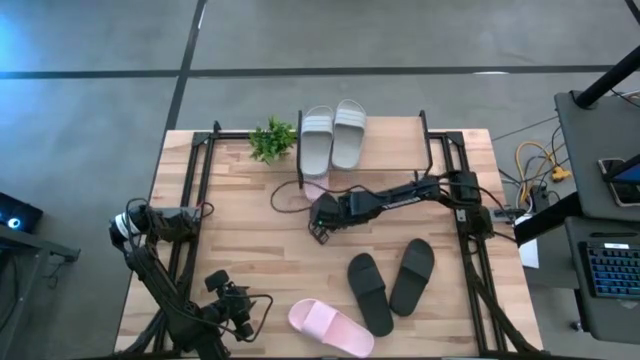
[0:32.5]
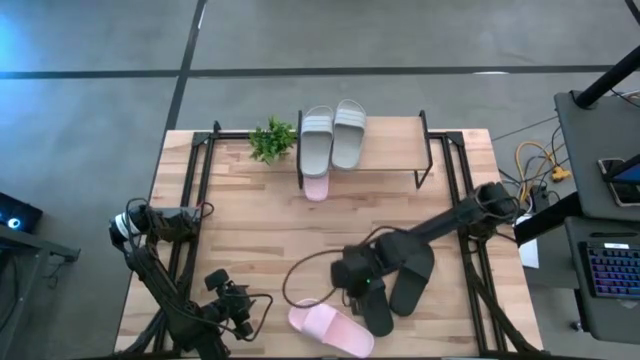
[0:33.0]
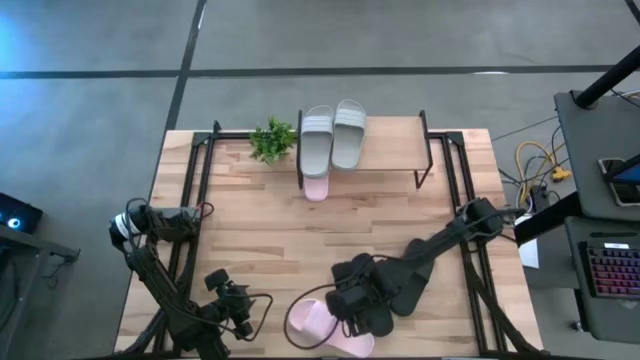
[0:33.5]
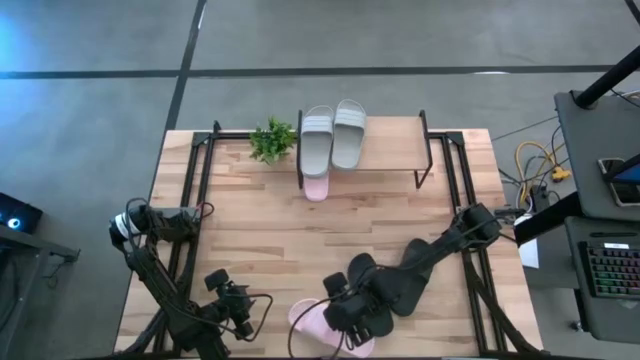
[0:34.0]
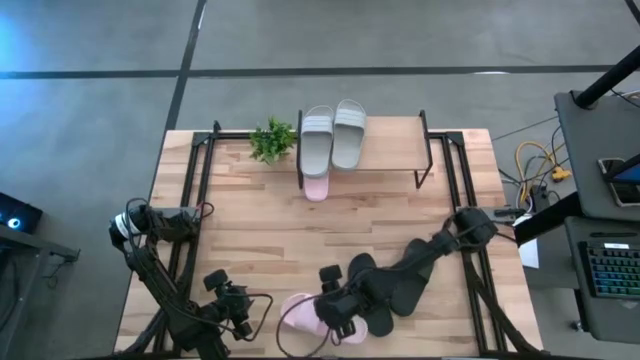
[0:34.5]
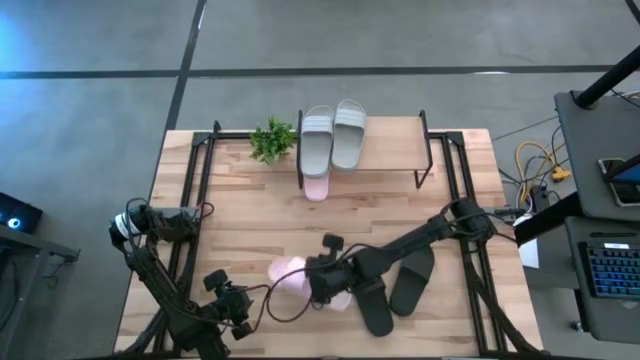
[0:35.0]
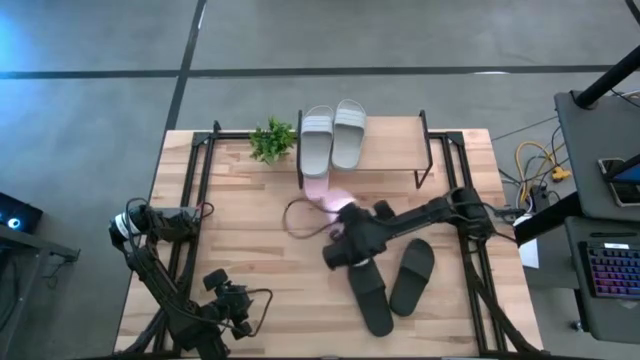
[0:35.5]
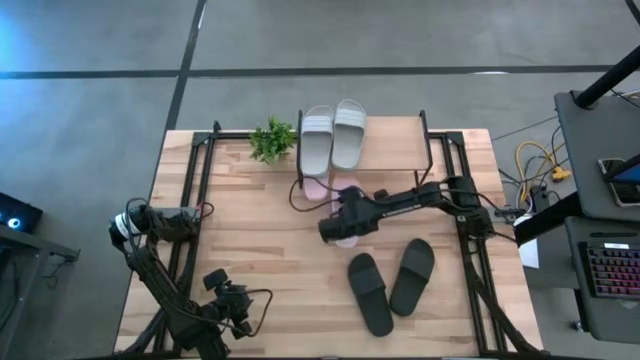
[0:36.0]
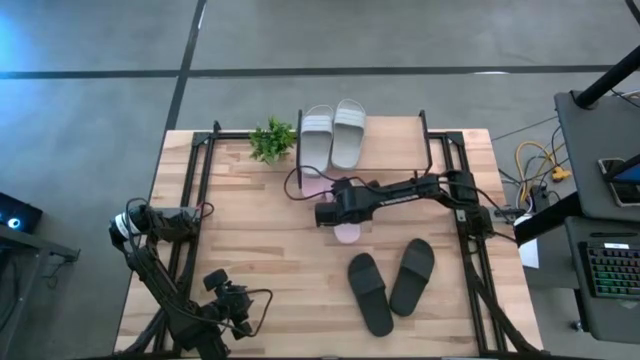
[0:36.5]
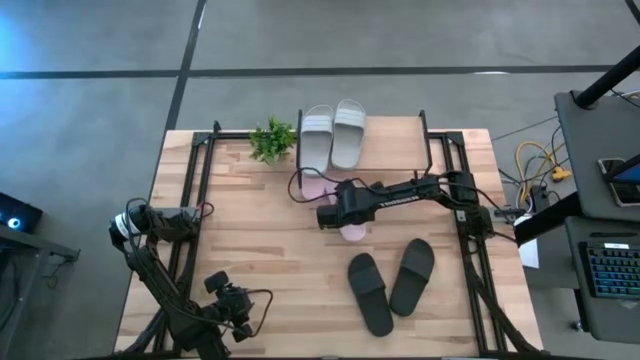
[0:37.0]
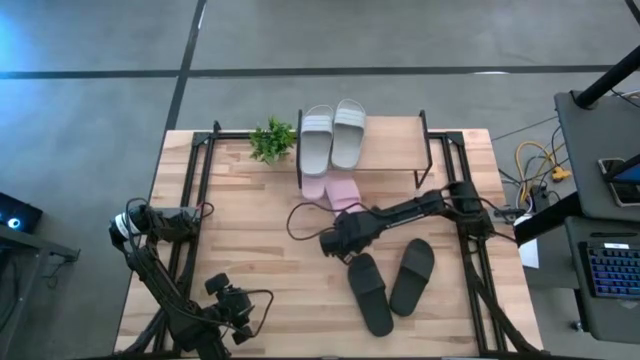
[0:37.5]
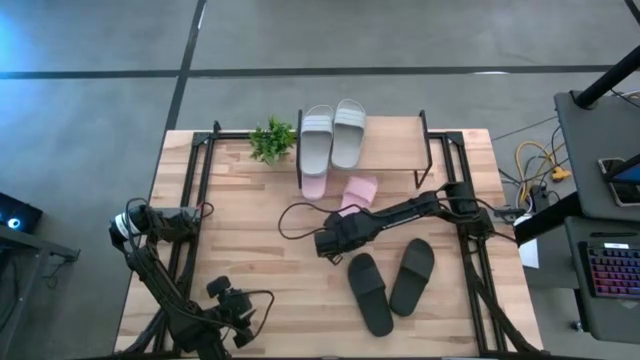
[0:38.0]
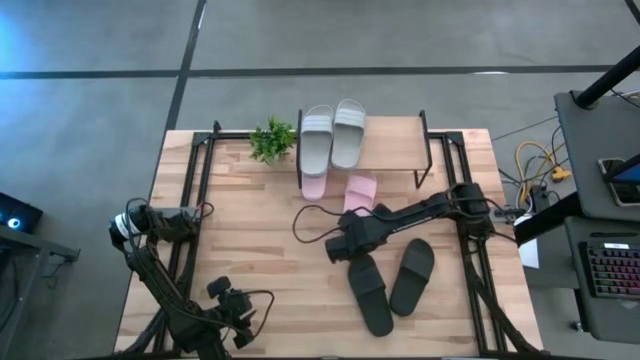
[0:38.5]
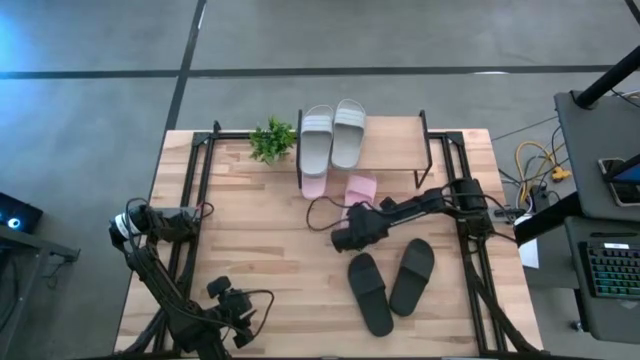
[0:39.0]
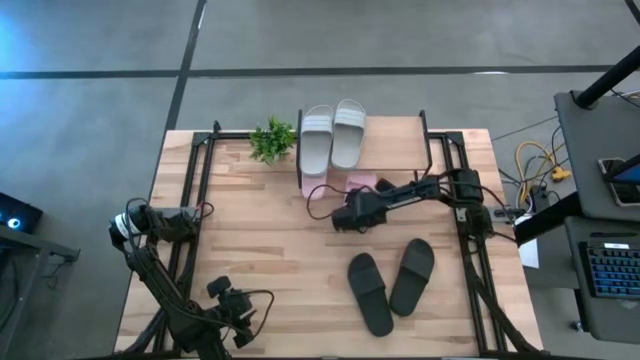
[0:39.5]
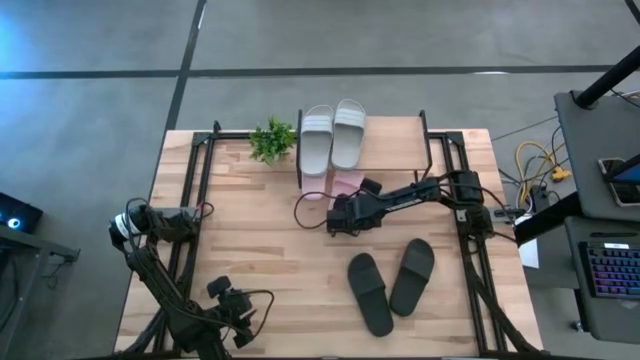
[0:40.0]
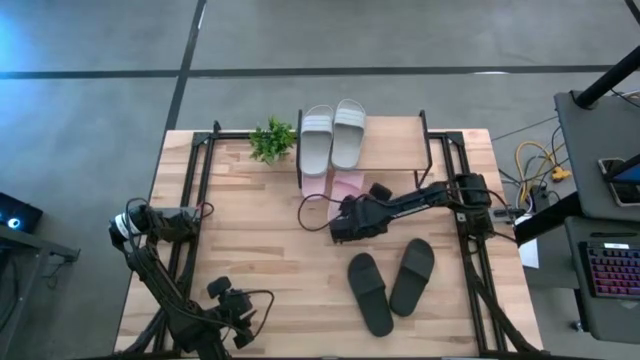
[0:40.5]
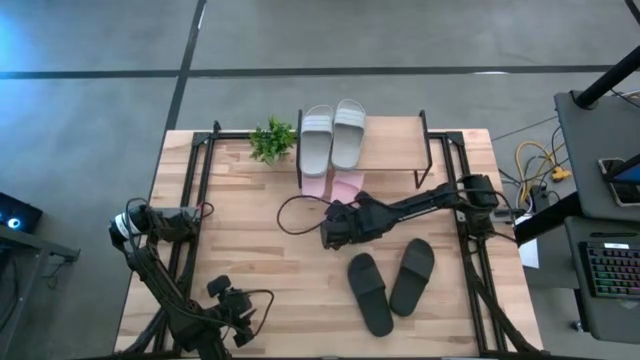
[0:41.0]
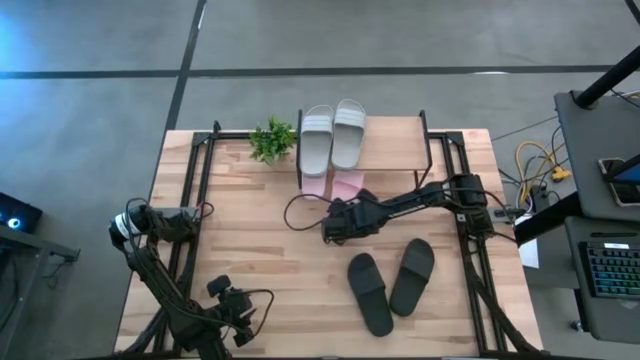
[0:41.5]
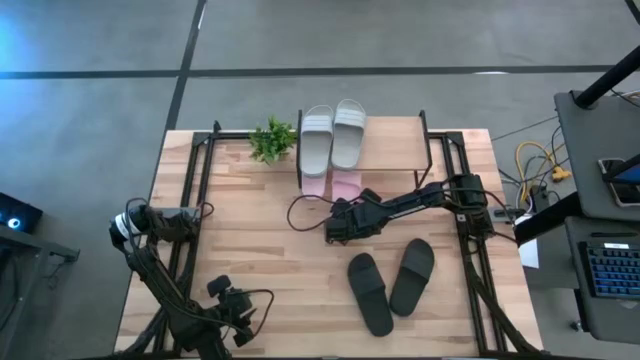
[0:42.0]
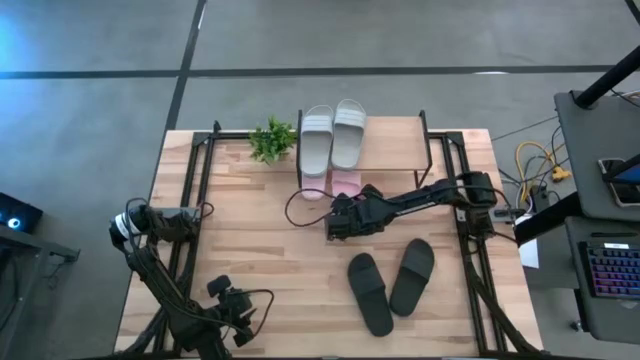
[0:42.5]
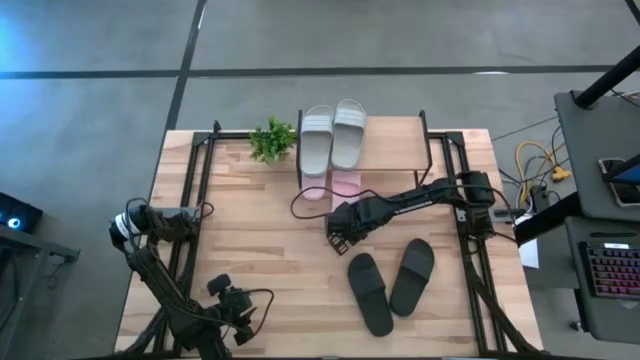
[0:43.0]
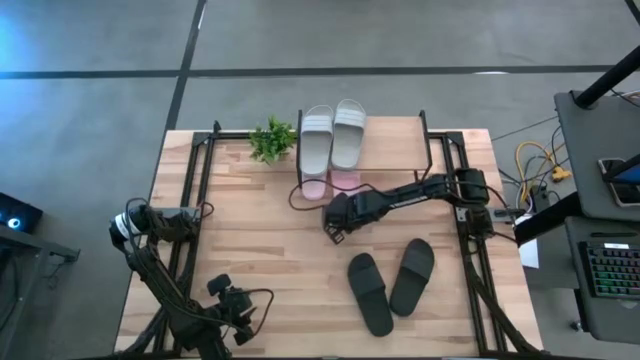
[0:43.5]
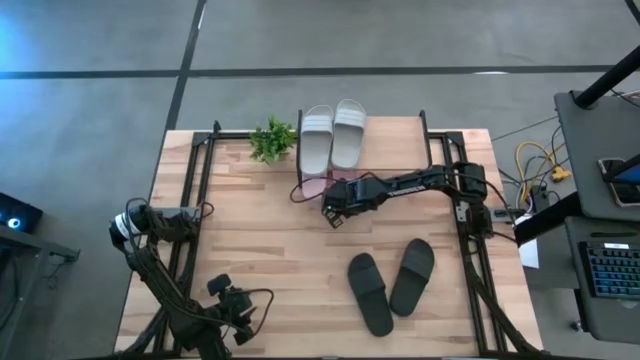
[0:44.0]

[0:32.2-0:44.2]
Task: Pick and place slides into the shelf
Put the pink slides under the shelf

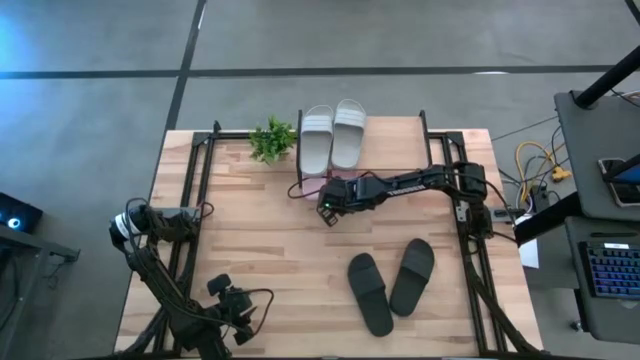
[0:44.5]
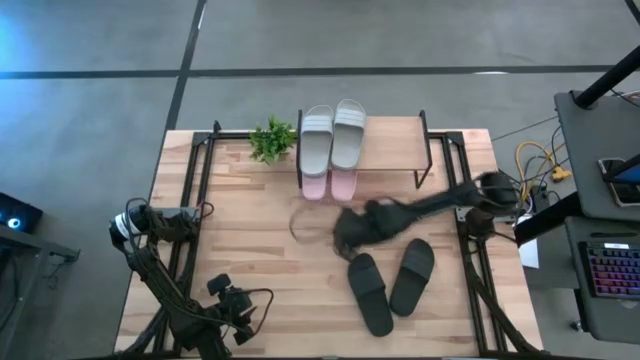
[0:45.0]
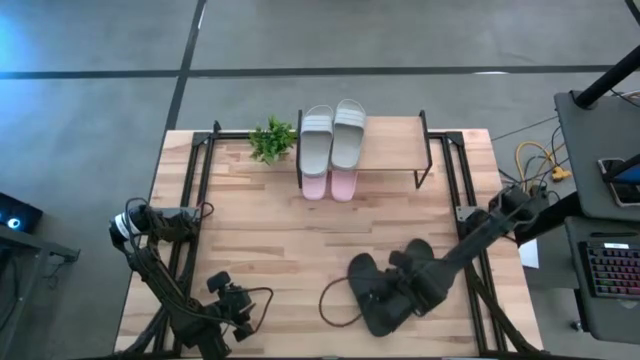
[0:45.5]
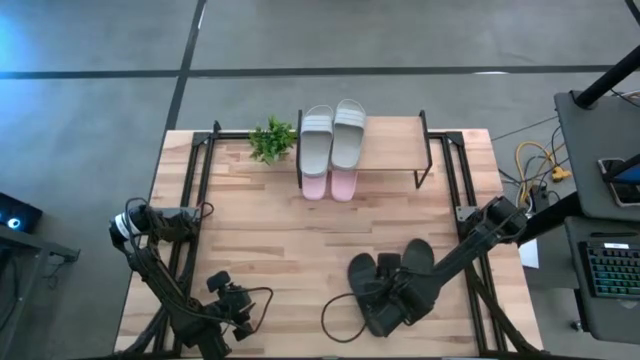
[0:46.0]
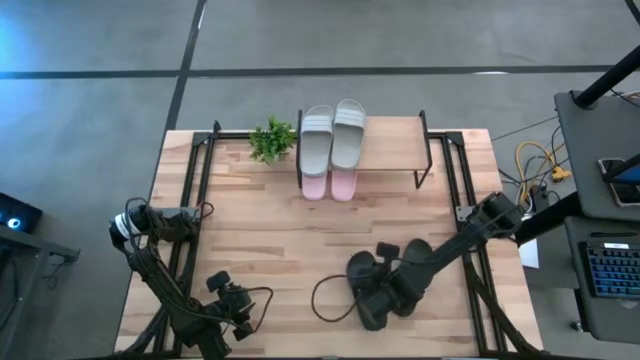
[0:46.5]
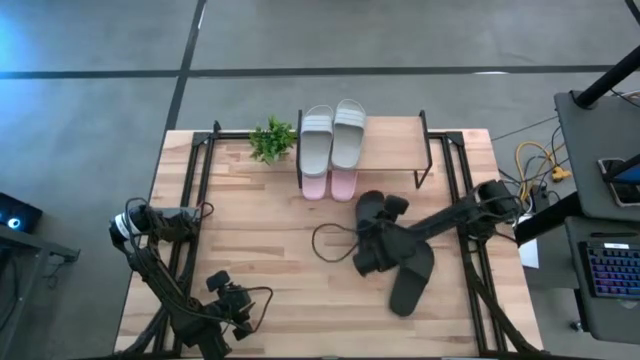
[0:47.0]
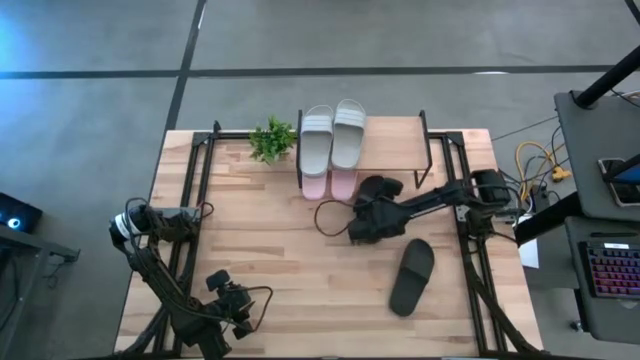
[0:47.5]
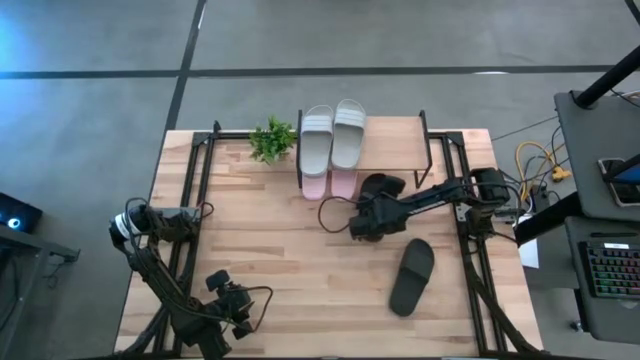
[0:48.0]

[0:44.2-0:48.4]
Put the left black slides under the shelf

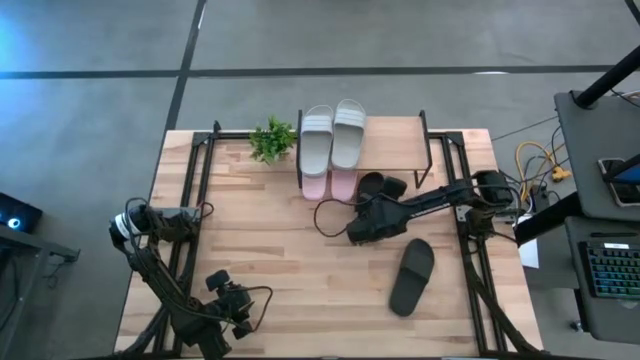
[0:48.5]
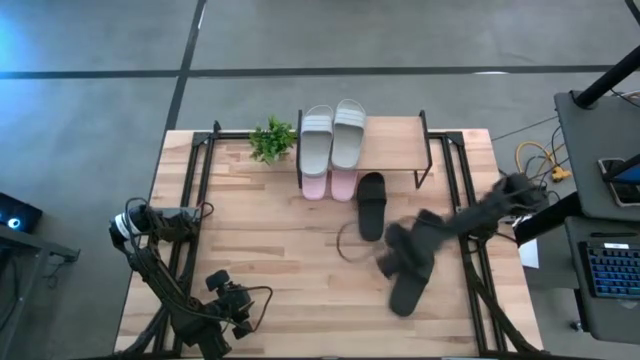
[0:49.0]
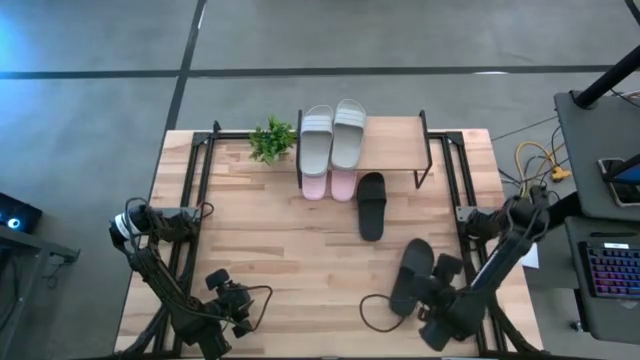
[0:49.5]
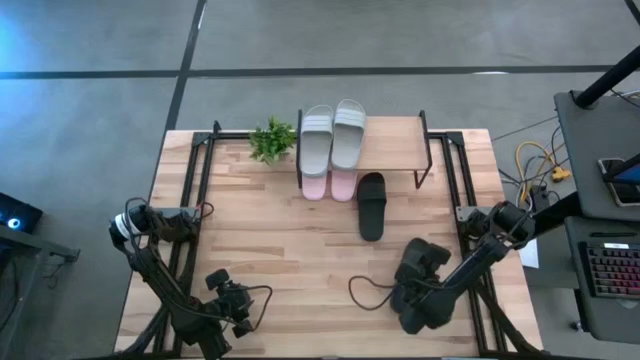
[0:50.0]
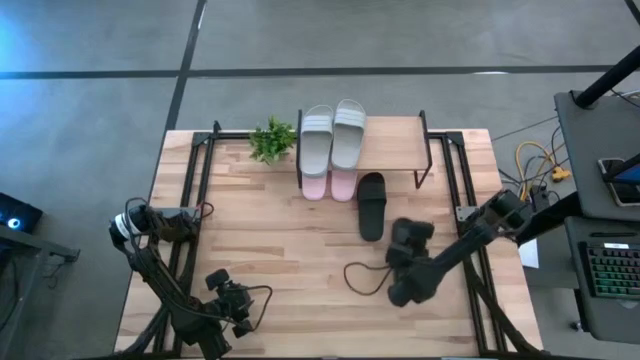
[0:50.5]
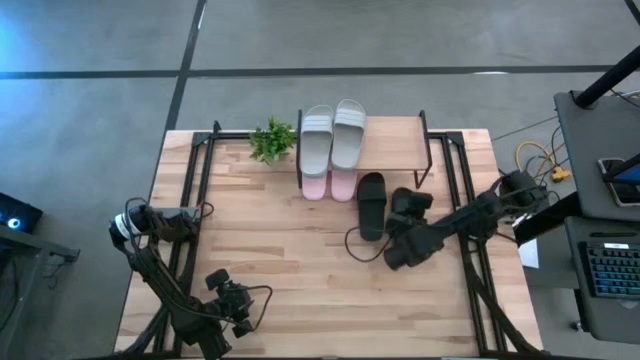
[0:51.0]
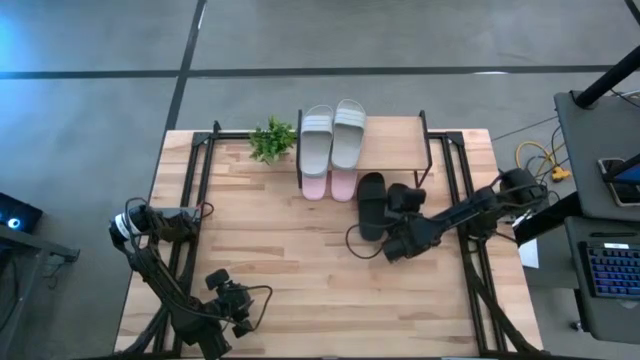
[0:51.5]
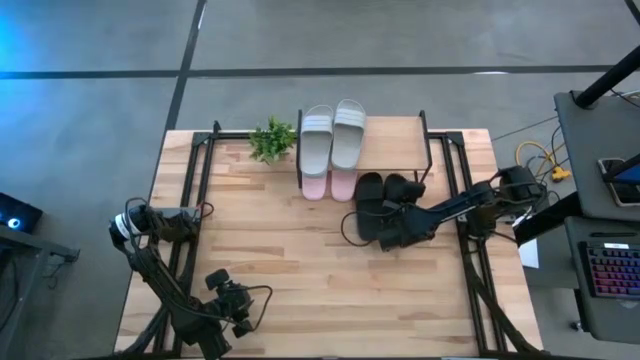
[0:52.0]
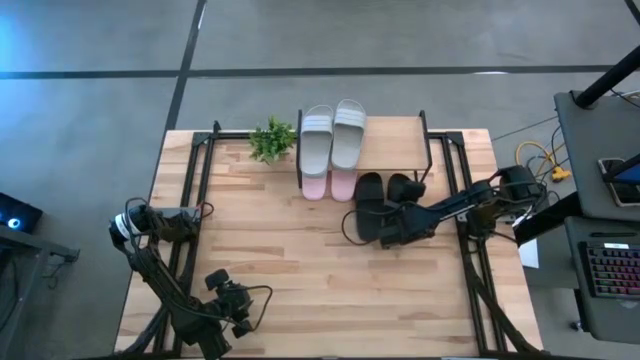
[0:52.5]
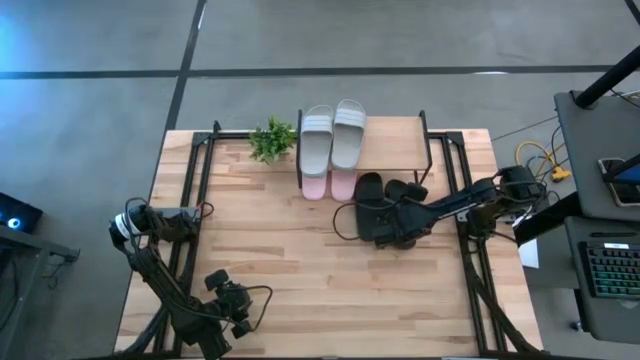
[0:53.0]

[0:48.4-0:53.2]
Put the bottom black slides under the shelf
